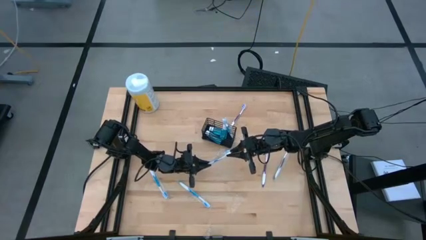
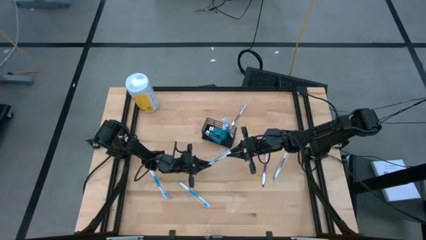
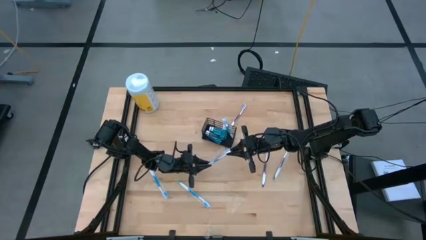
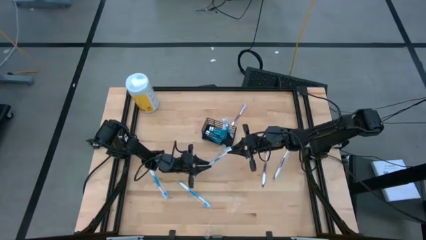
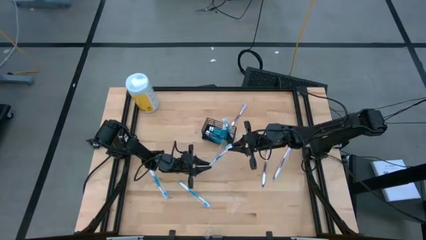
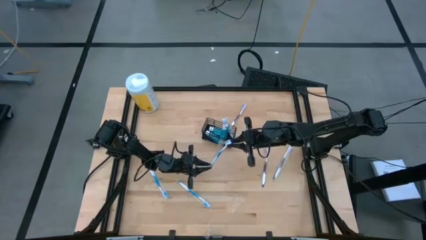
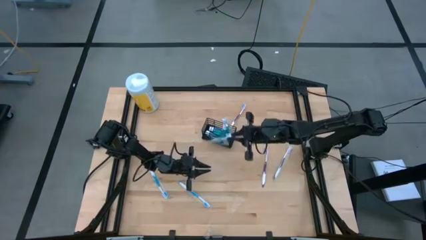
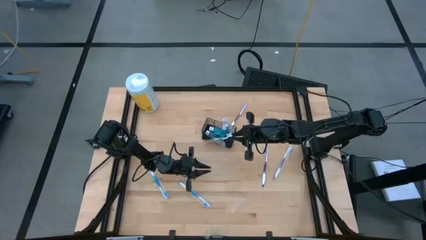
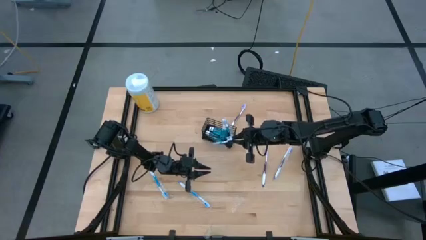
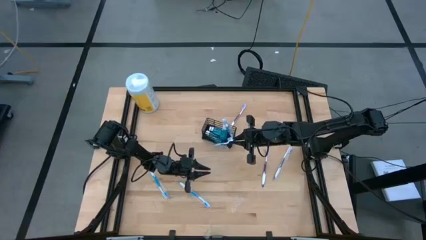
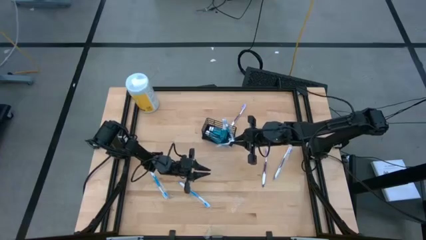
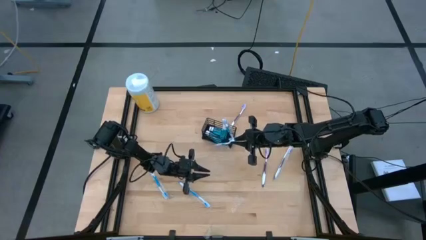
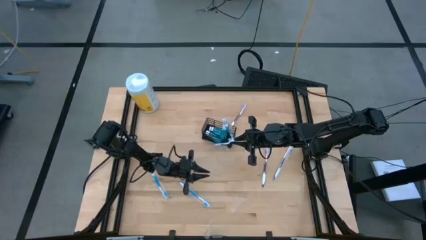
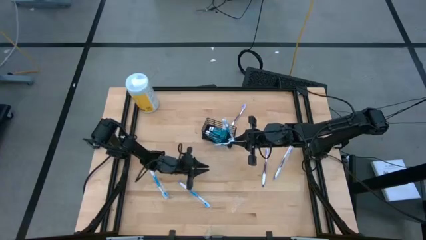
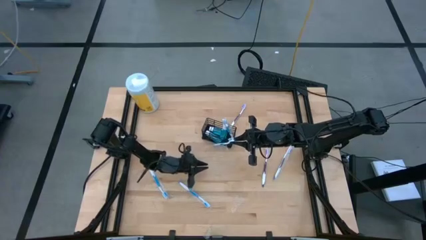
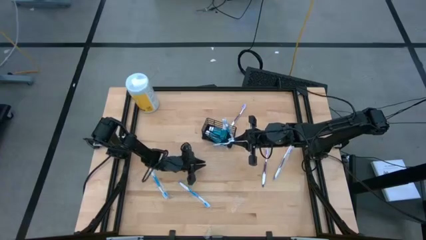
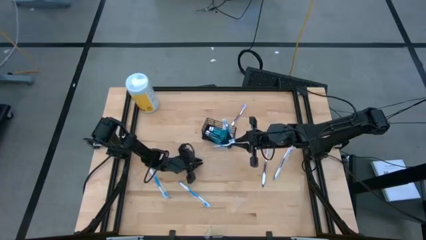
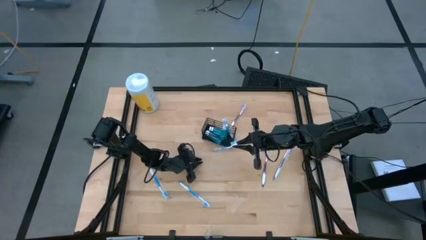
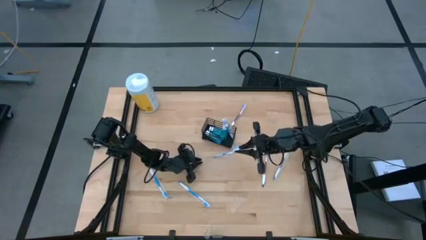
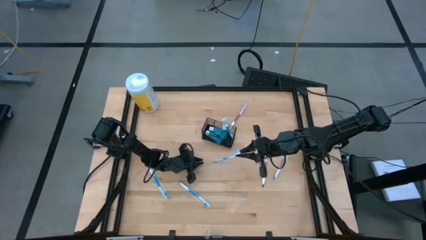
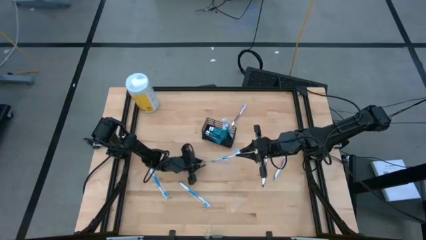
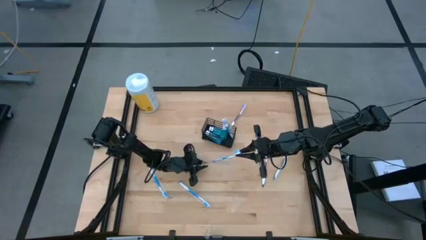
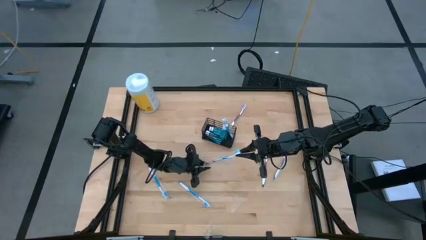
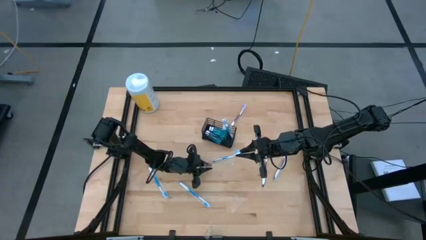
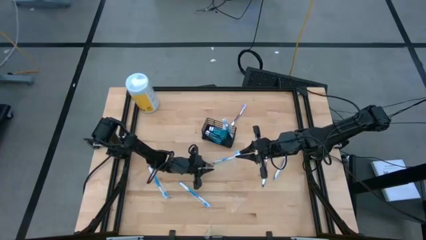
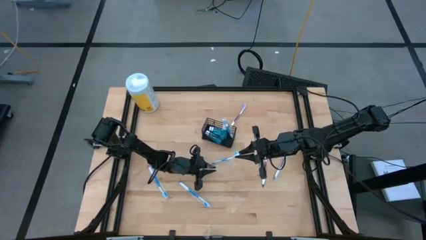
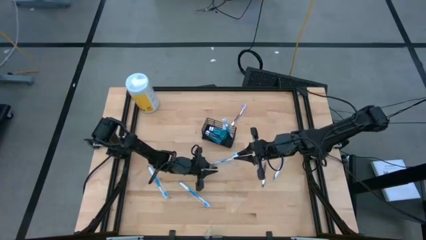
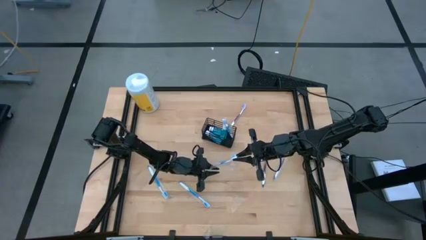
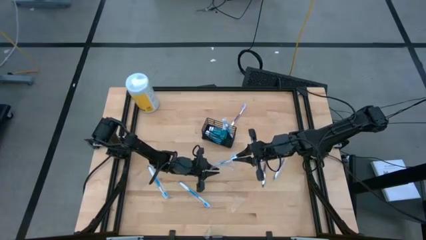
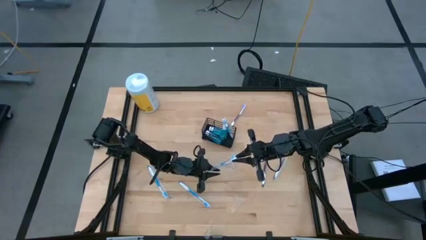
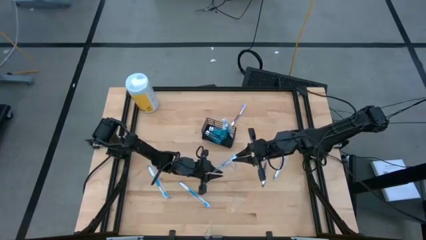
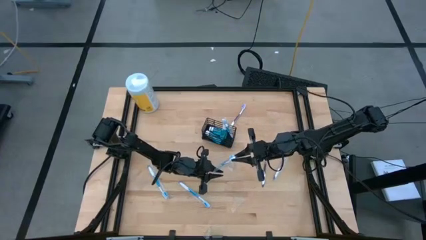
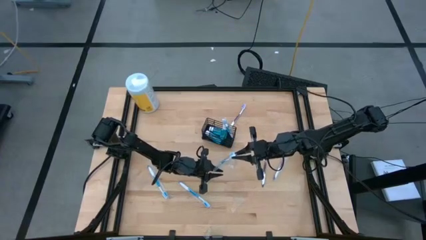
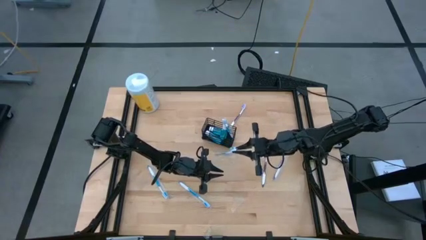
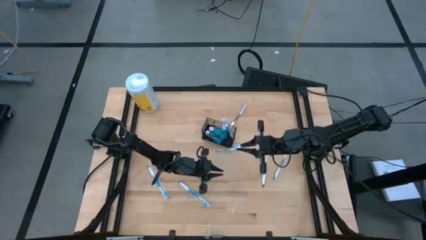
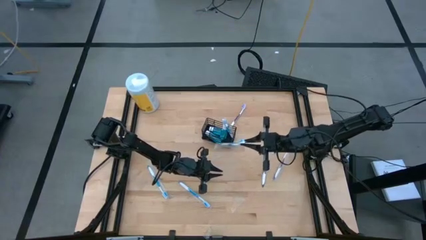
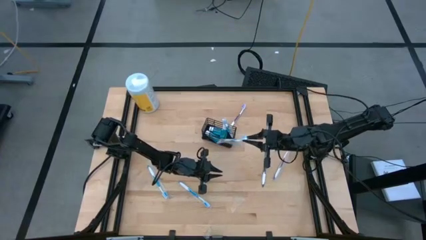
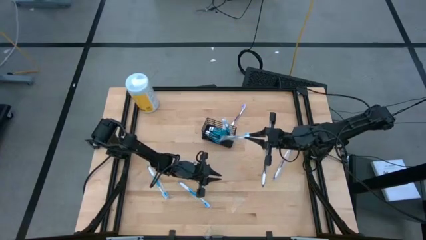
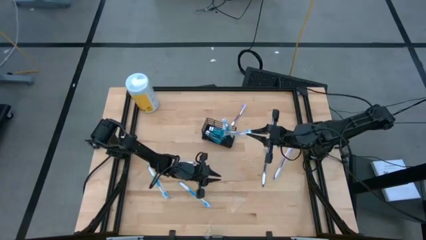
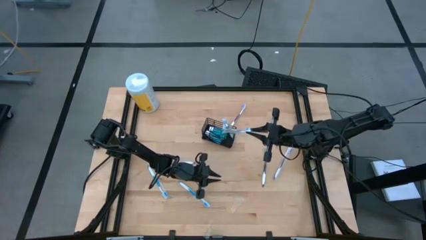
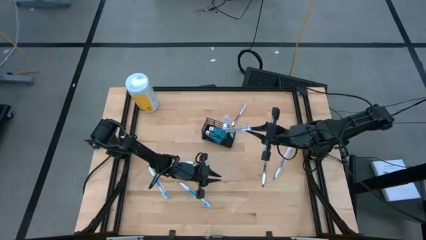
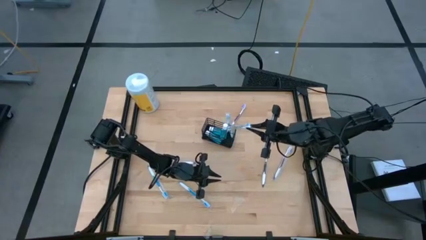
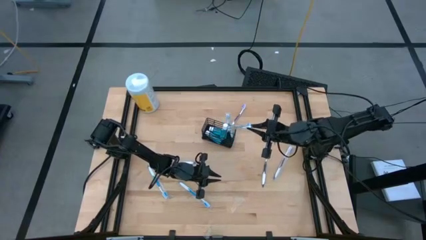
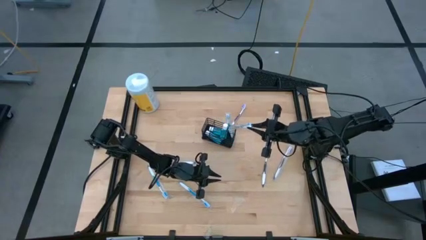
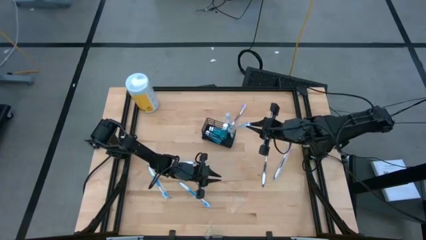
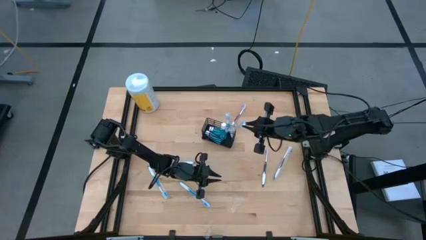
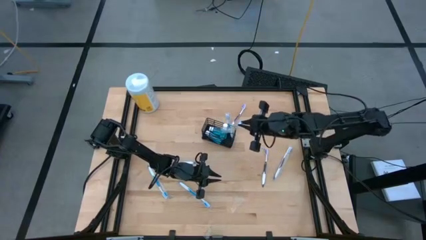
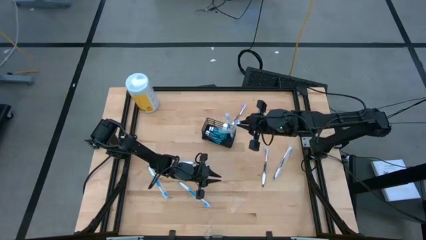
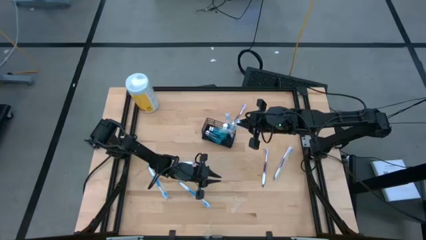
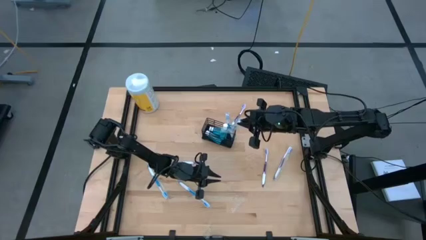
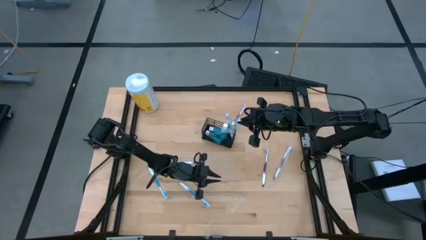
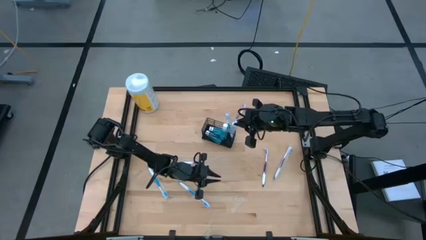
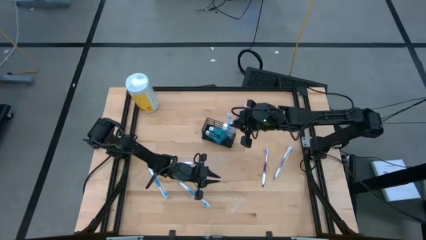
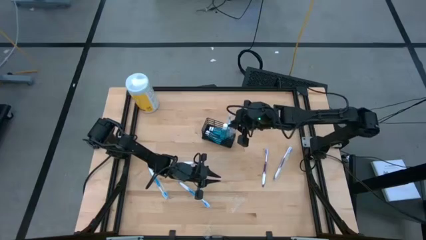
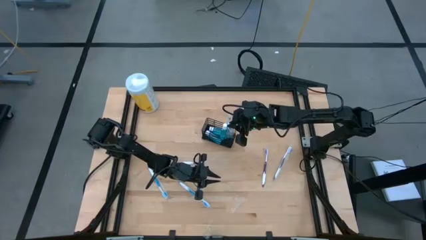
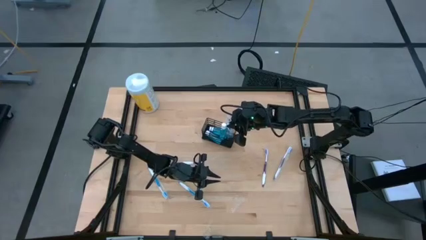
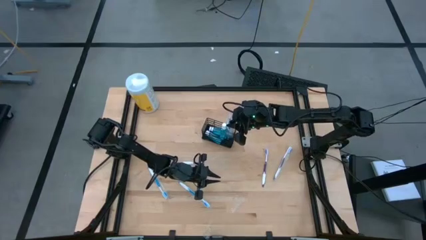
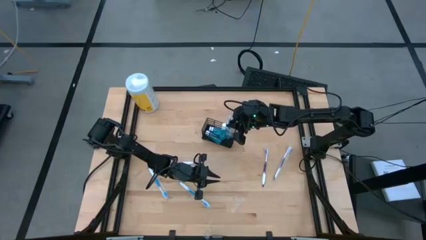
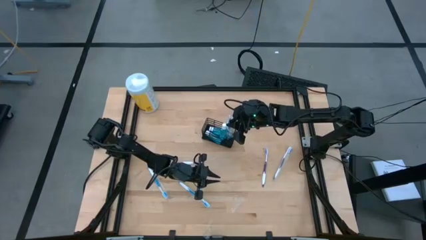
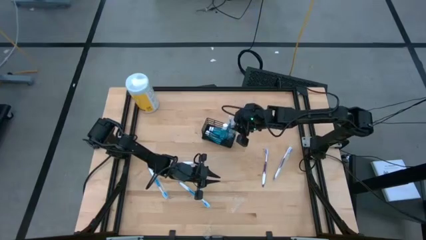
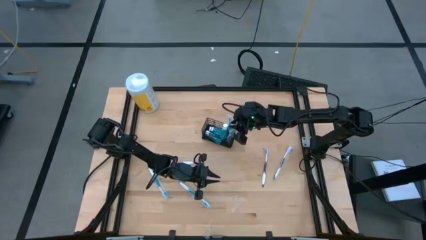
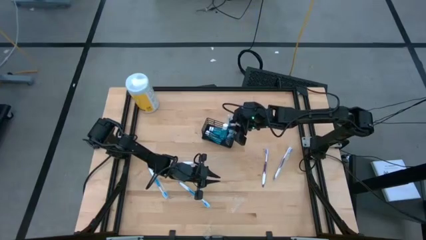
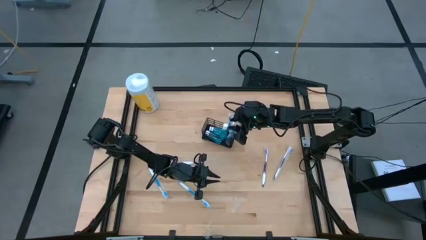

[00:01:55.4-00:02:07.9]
Task: Pick & Place toothbrushing station
Put the blue toothbrush into the wire organizer

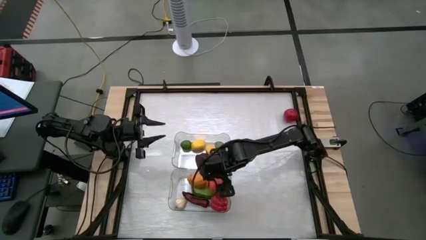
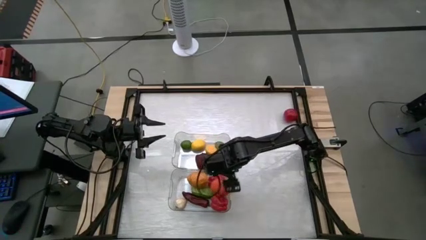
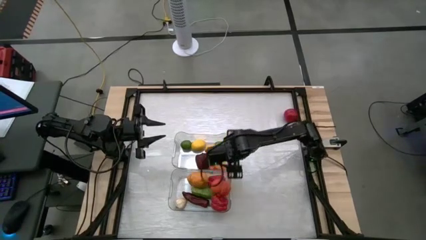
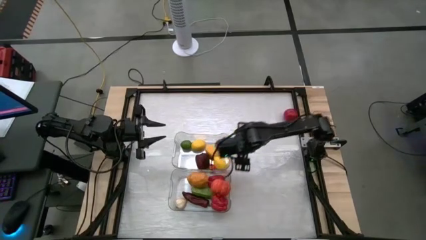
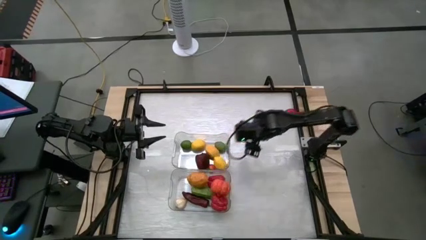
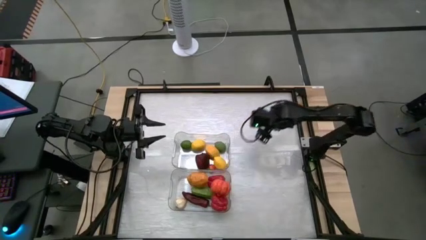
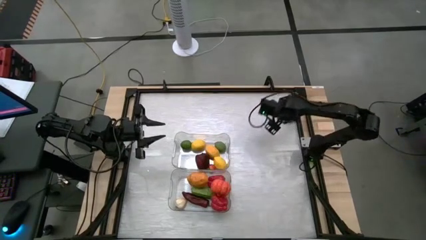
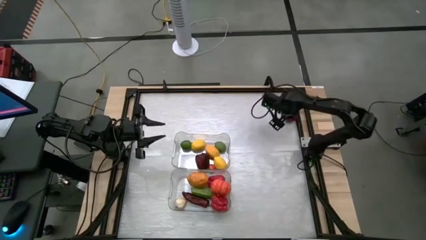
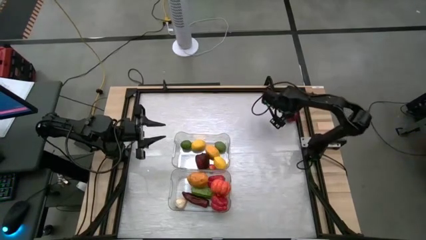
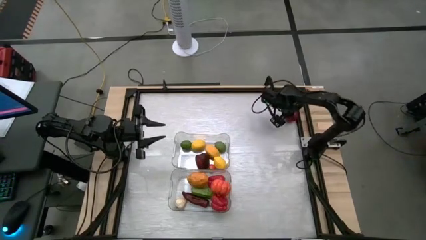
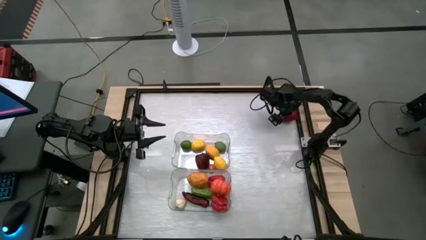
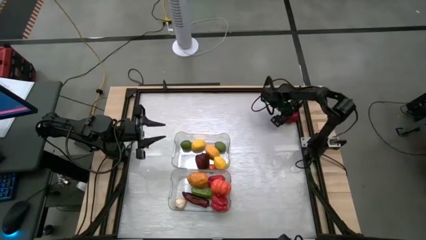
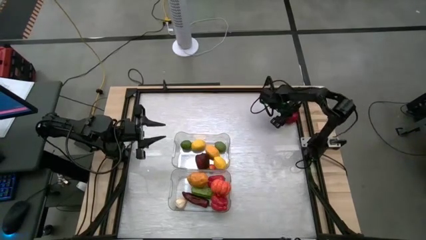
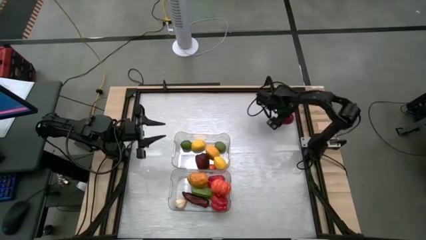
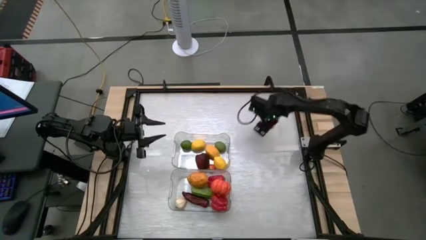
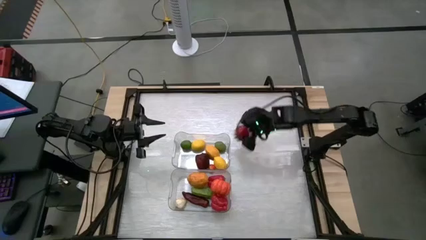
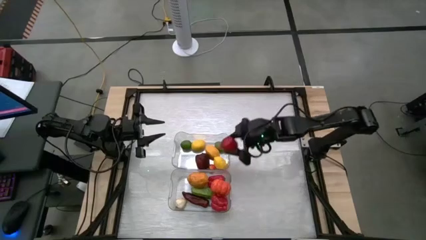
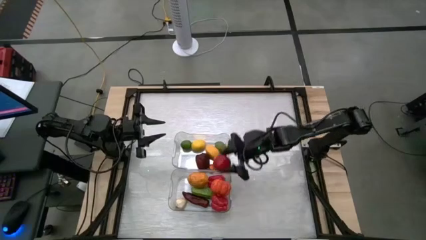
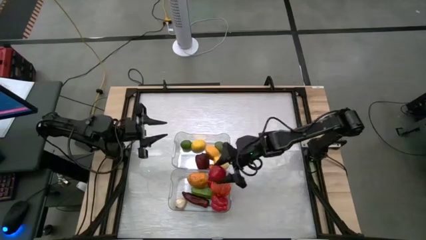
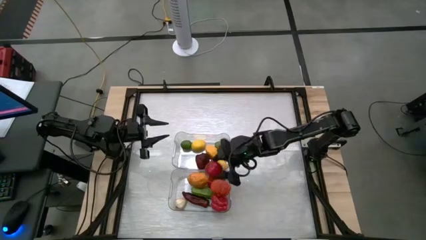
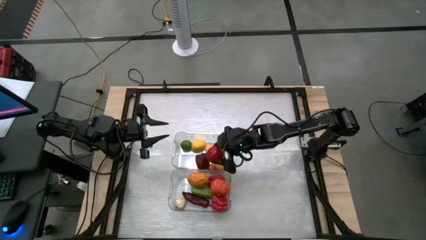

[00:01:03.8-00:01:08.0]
Task: Sort produce into baskets
Put the tomato into the bottom transparent bin
